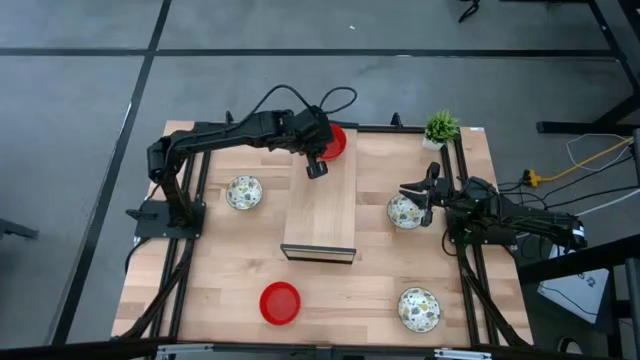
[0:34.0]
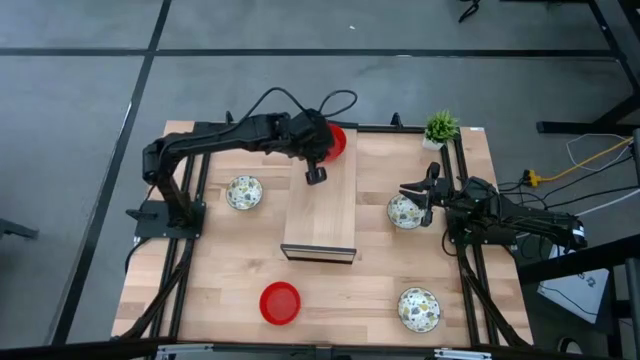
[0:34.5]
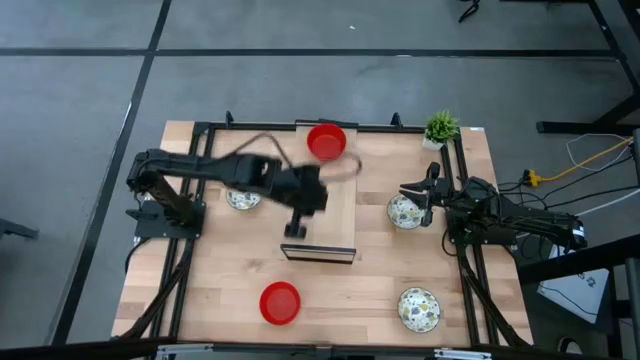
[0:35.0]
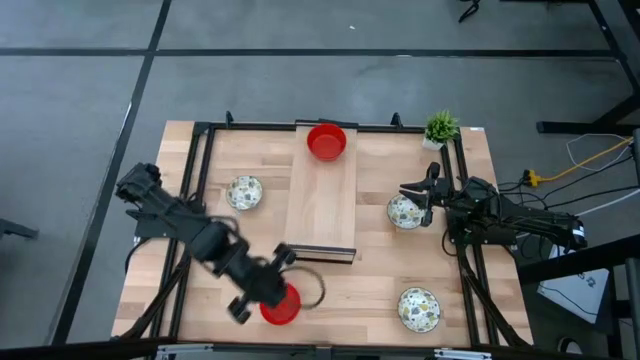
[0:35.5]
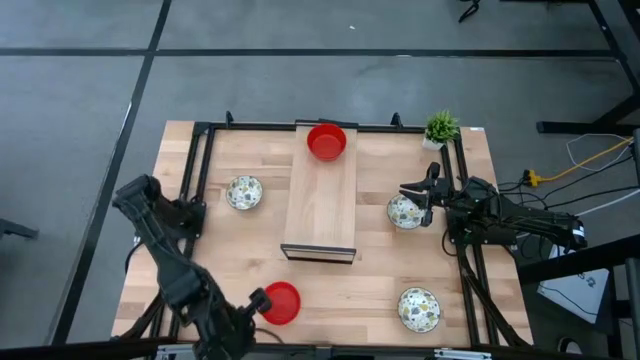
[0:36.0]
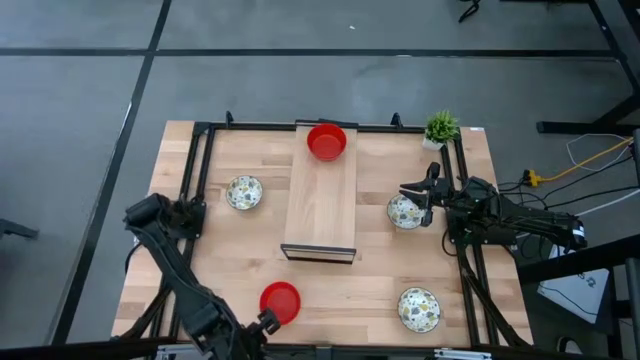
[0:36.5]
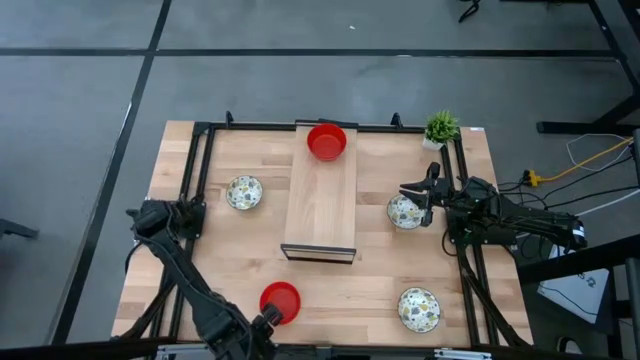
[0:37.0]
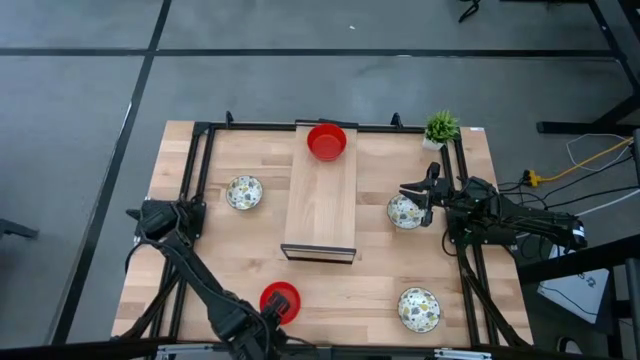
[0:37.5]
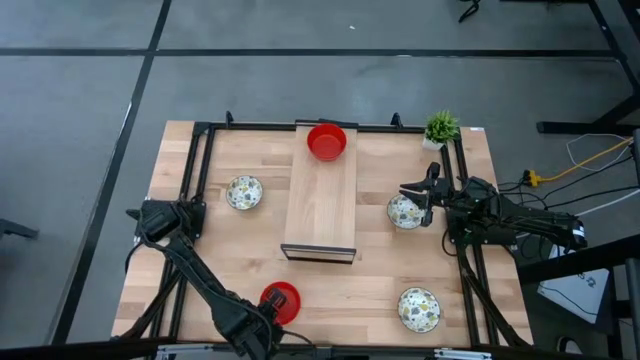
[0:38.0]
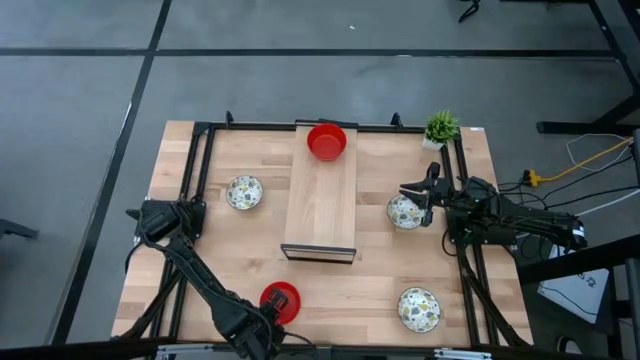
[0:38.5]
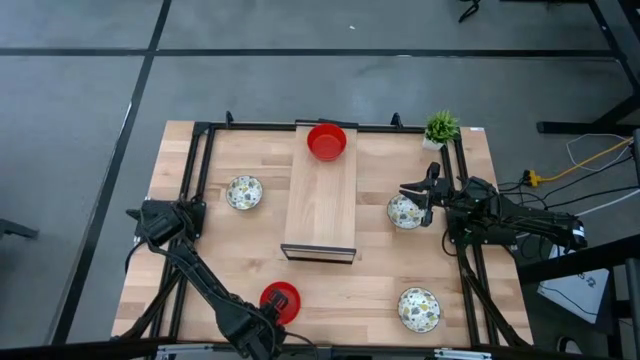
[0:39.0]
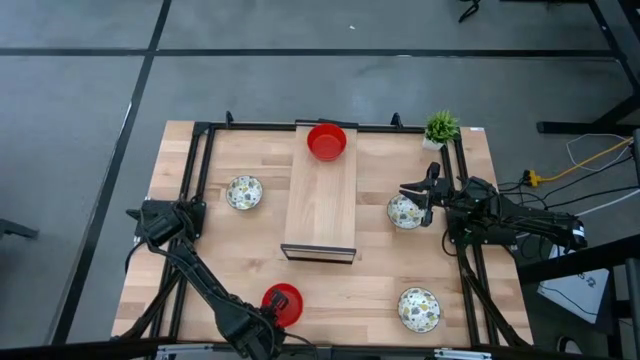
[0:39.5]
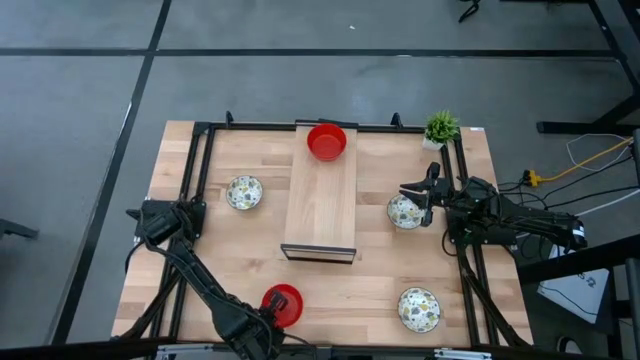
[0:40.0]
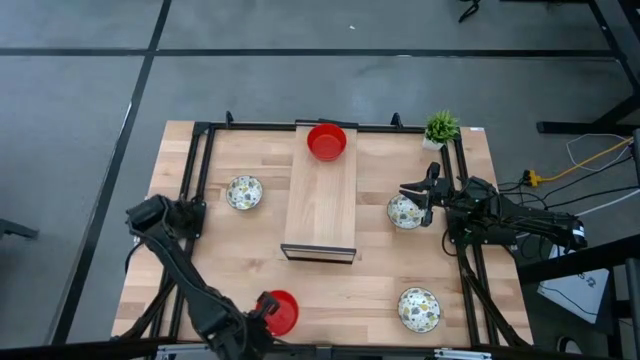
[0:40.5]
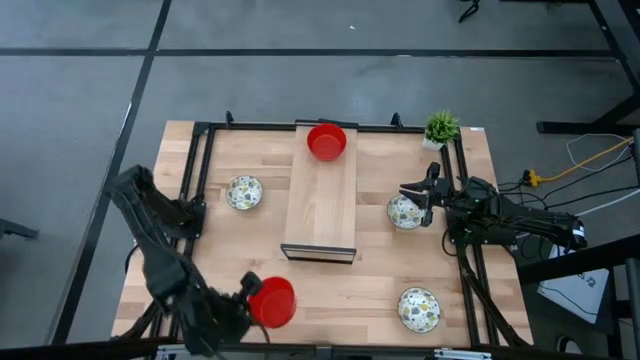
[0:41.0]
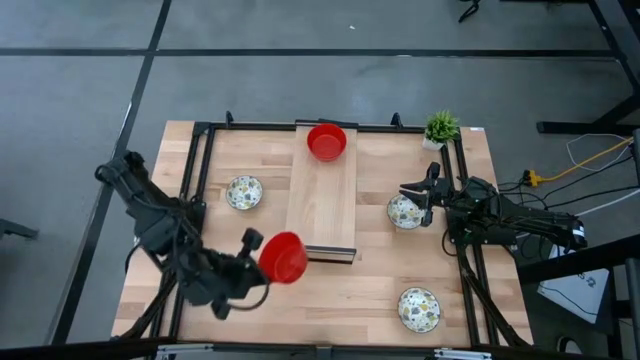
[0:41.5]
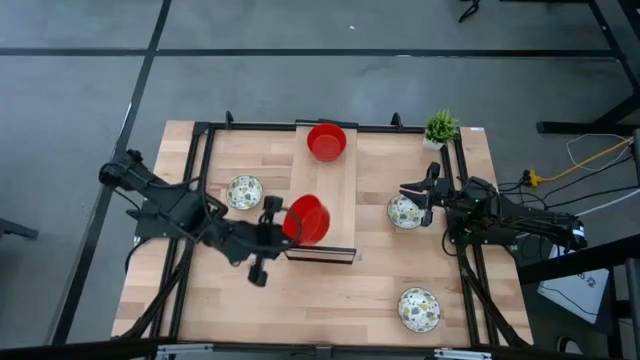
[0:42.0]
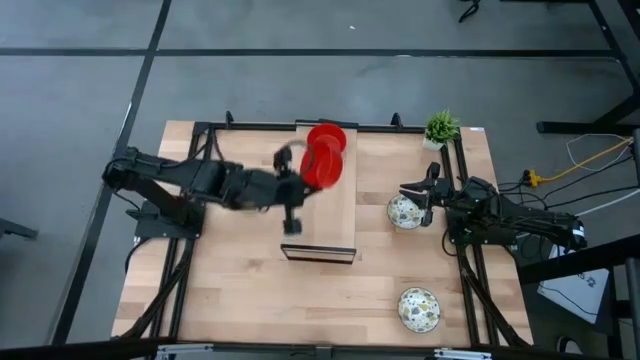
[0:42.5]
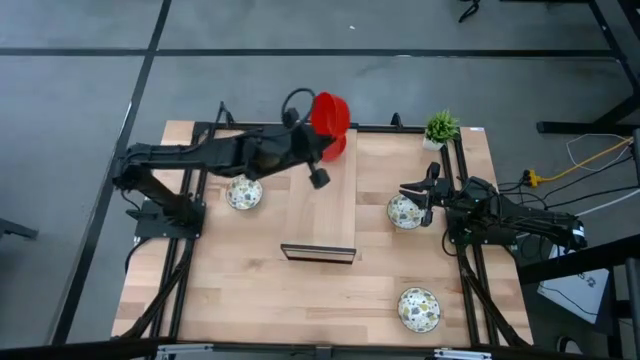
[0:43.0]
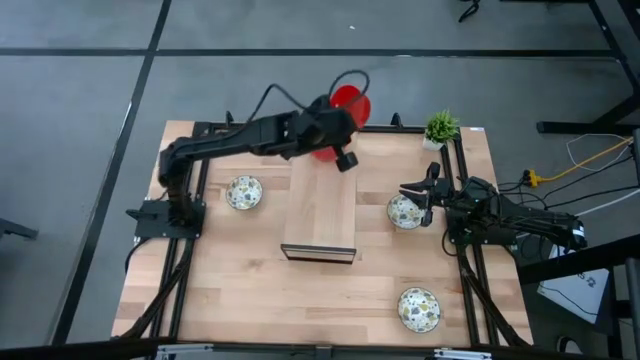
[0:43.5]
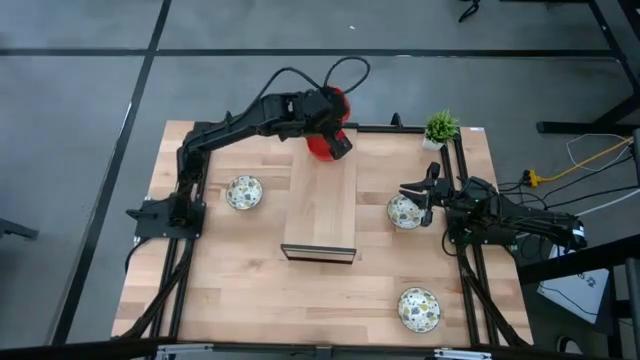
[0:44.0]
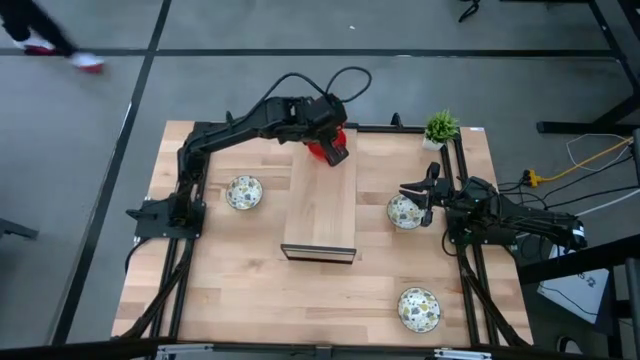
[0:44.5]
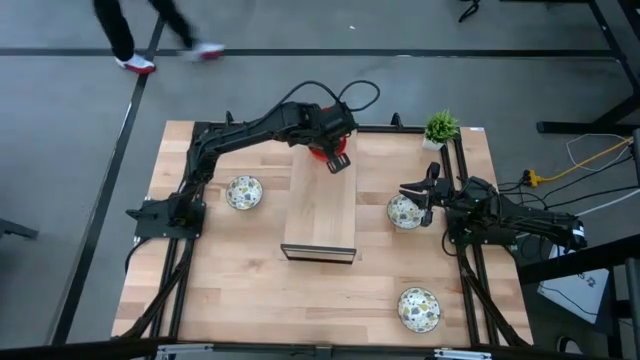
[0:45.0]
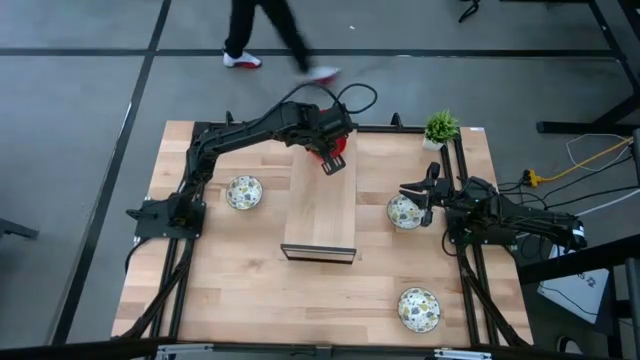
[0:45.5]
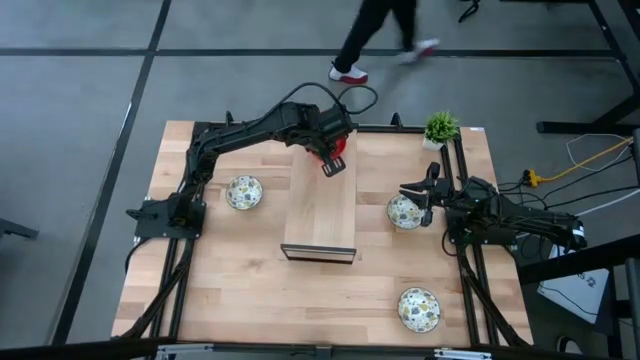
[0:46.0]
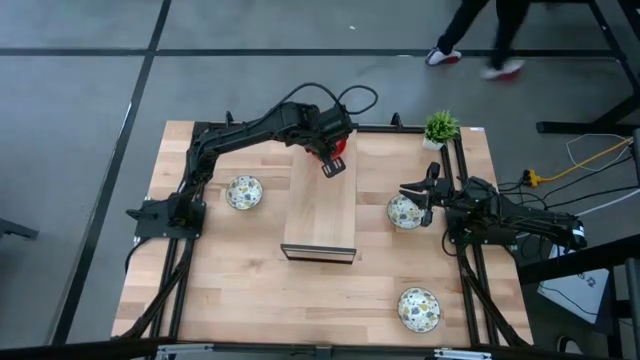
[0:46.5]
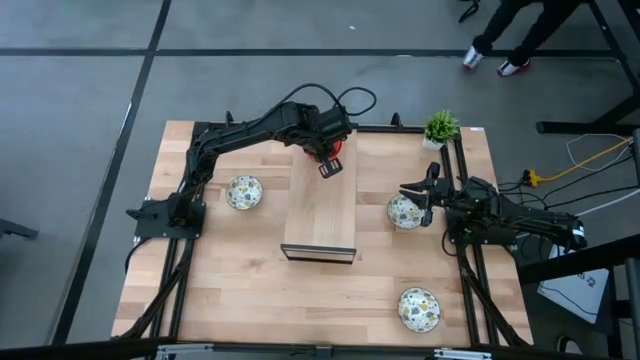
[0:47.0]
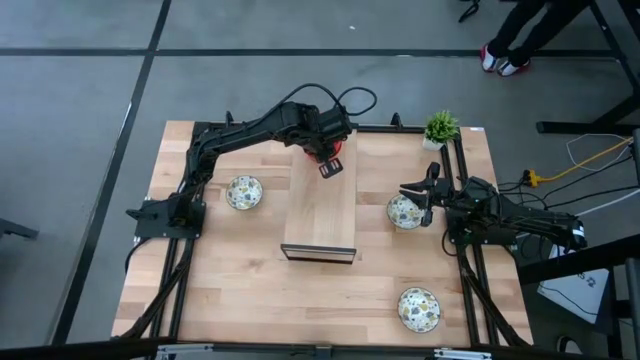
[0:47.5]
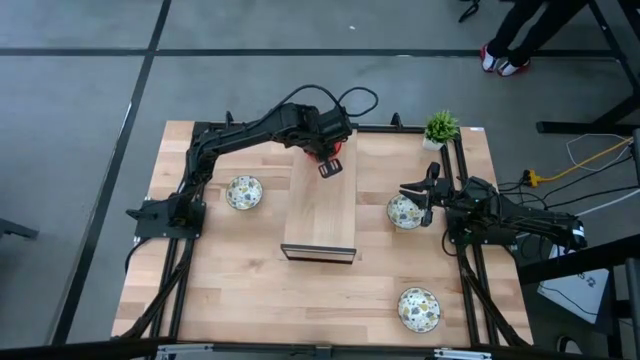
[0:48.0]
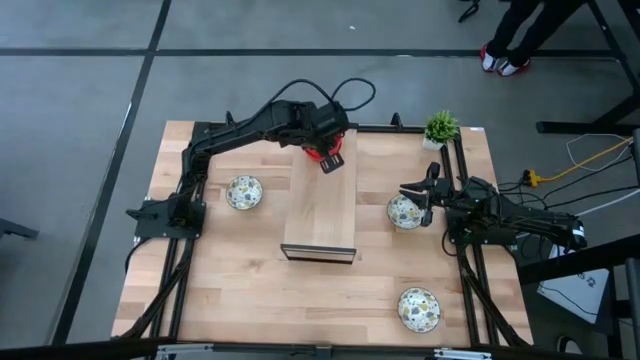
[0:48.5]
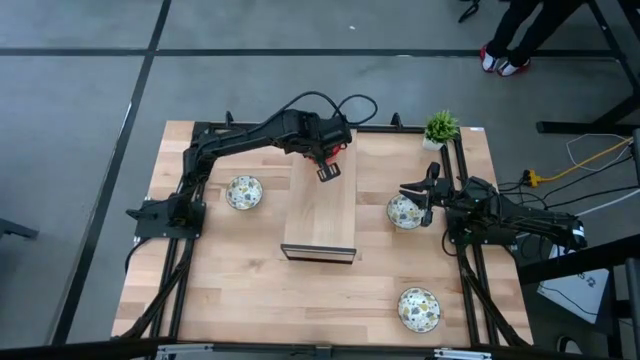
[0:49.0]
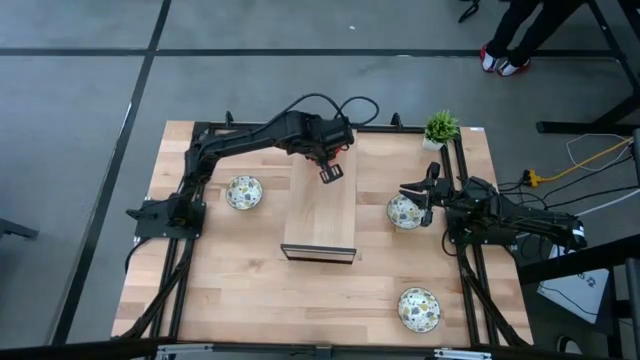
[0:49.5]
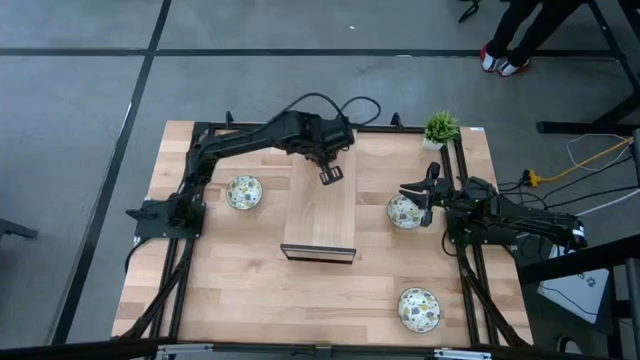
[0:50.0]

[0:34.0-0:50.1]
Task: Pick & Place Mini bowls
Stack the red bowl on top of the red bowls on the shelf
